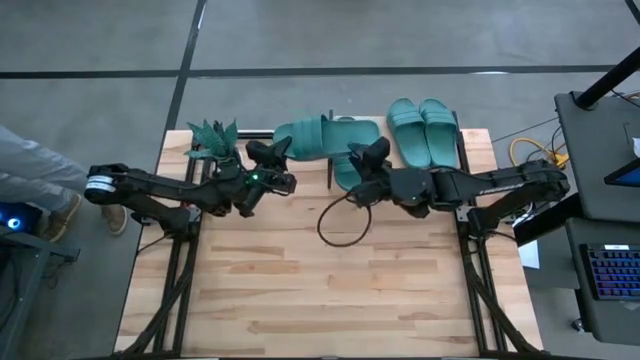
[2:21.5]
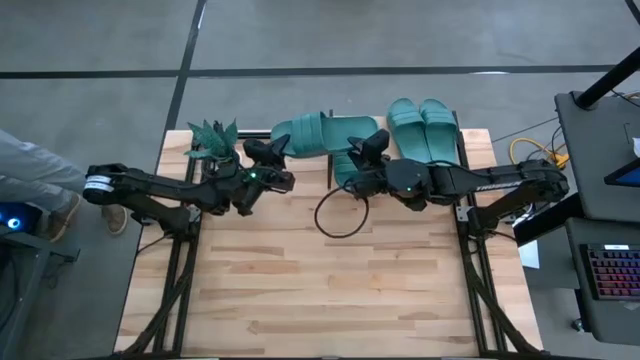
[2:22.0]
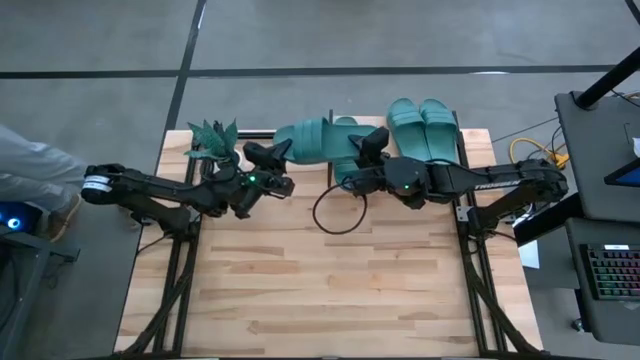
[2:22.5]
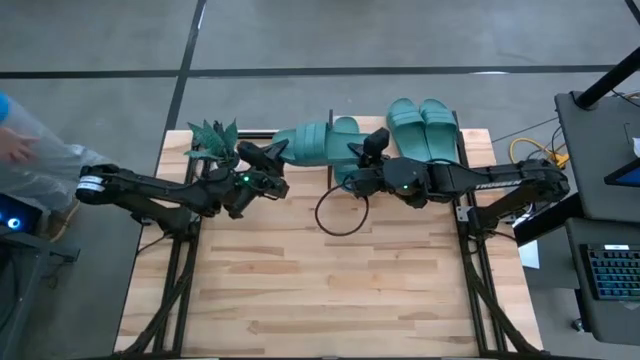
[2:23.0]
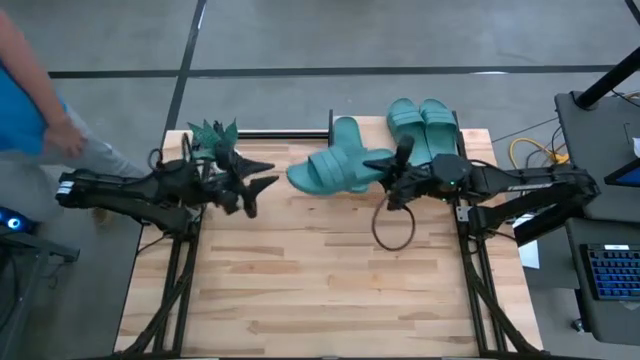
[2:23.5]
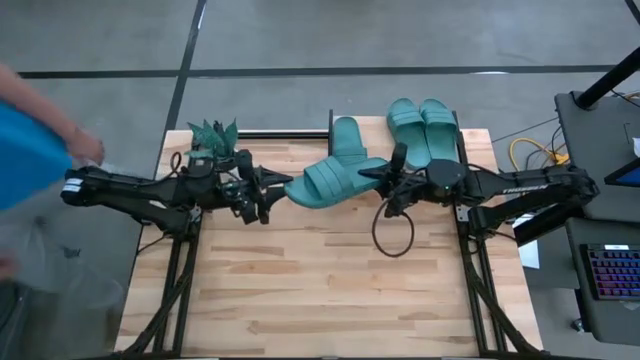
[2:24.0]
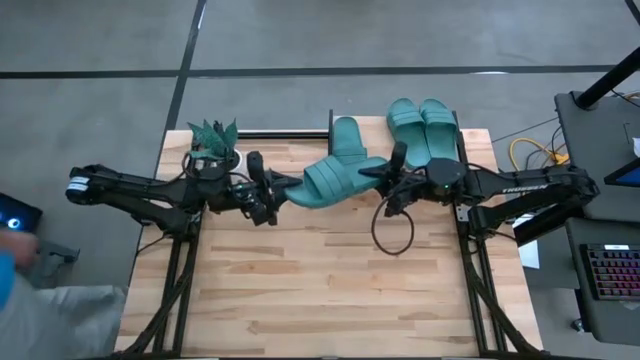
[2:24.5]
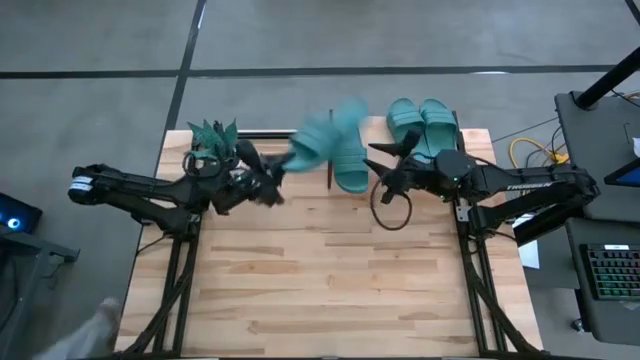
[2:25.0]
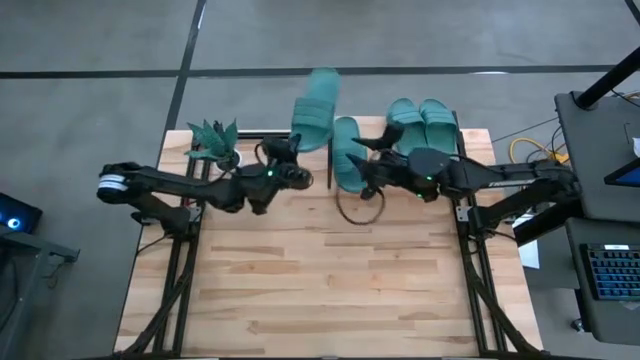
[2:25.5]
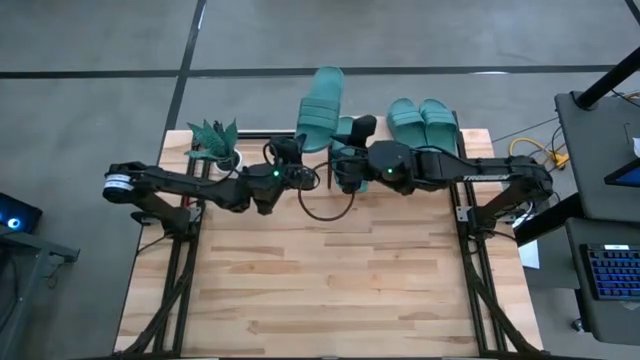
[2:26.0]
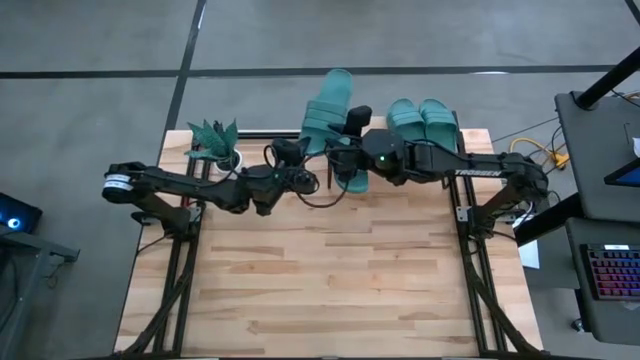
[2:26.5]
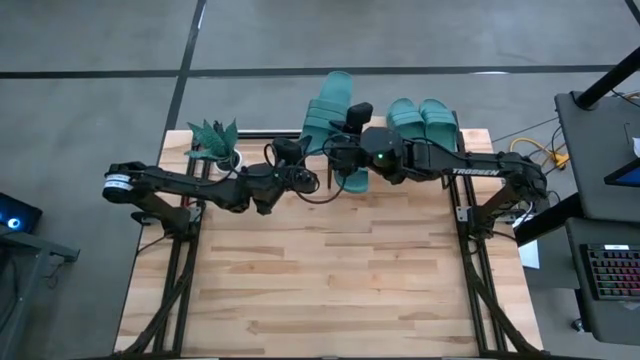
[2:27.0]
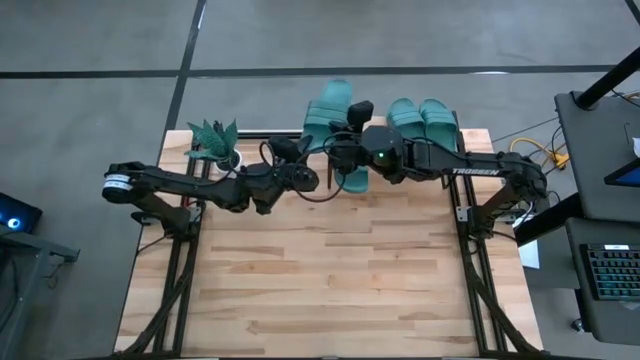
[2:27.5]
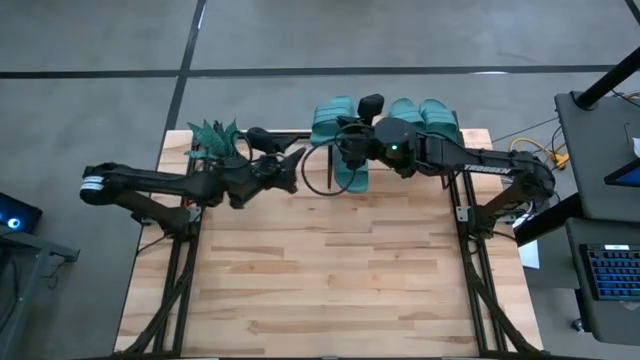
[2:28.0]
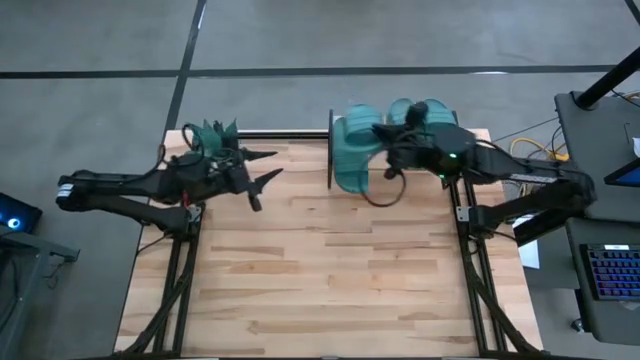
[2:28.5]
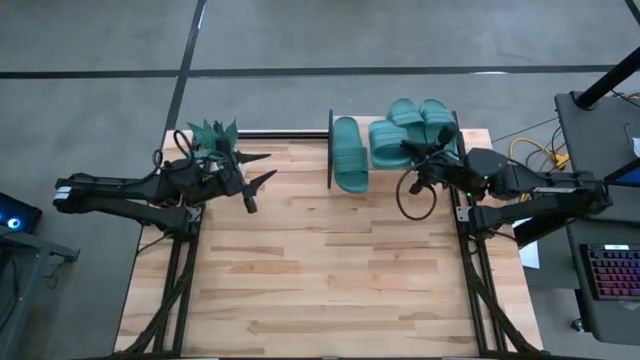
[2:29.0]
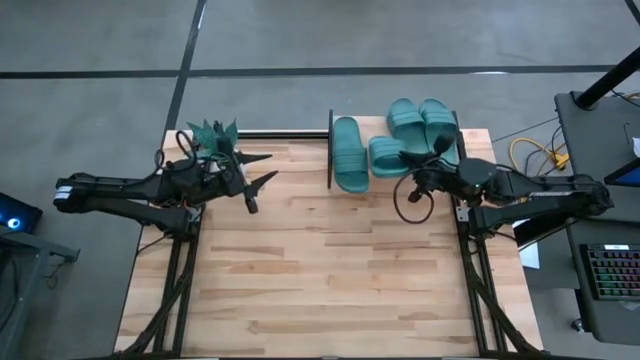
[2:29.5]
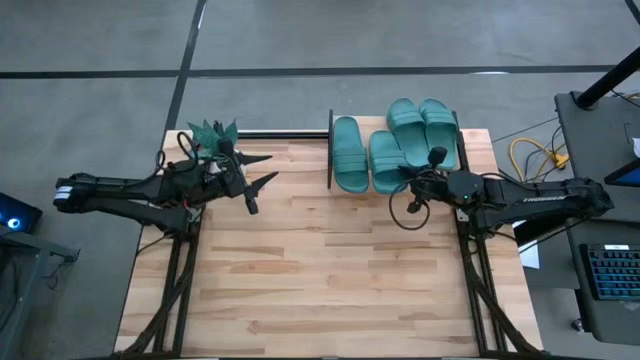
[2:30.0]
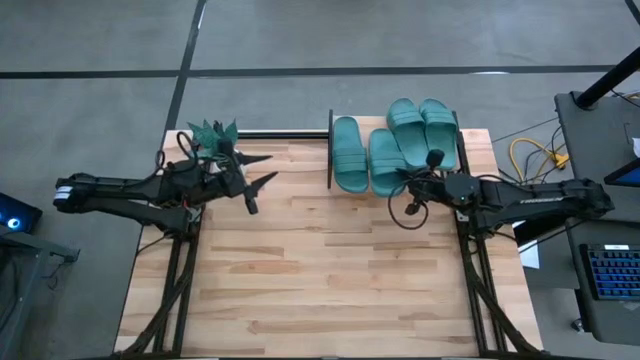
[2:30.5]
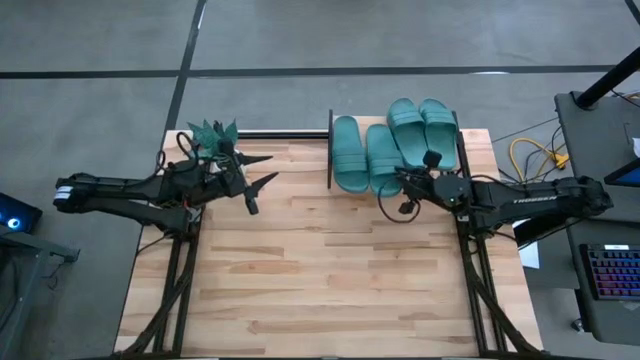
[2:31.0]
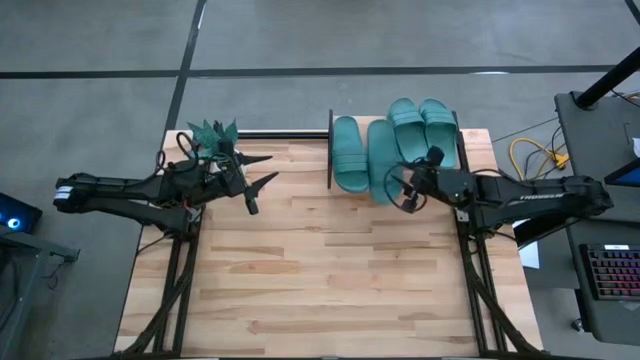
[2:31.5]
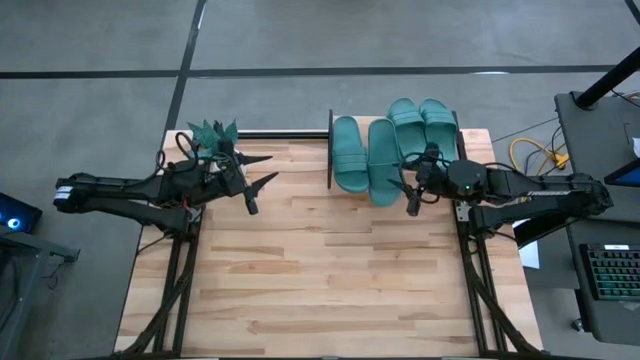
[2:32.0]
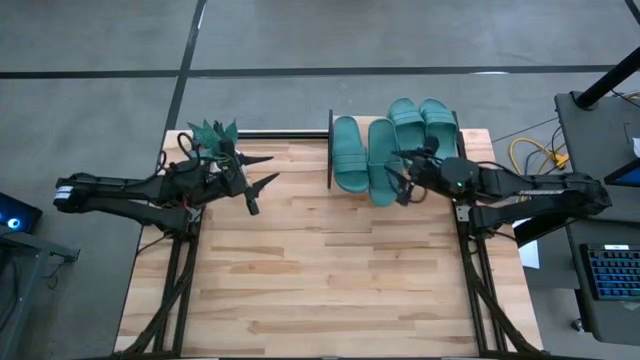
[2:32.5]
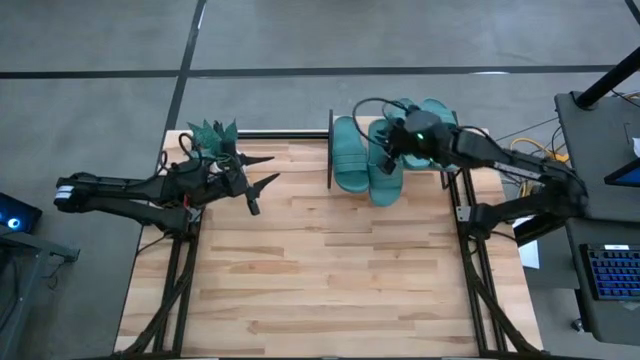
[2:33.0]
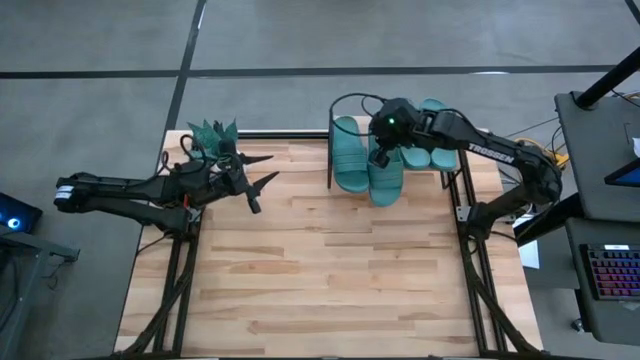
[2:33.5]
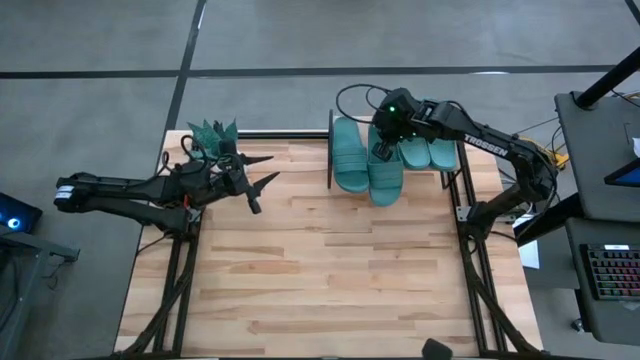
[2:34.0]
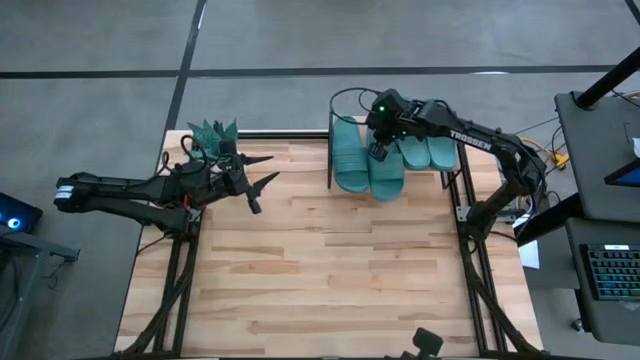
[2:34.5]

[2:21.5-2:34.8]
Task: Pick and place slides into the shelf
Put the green slipper on the shelf

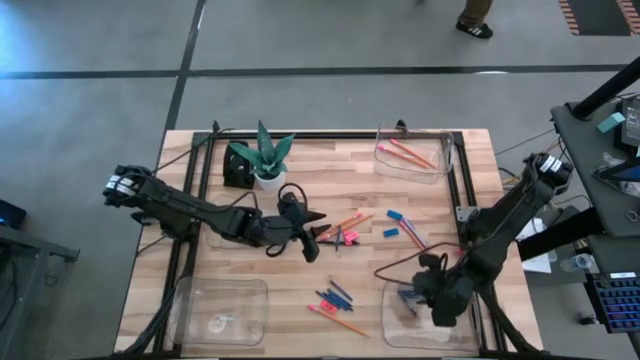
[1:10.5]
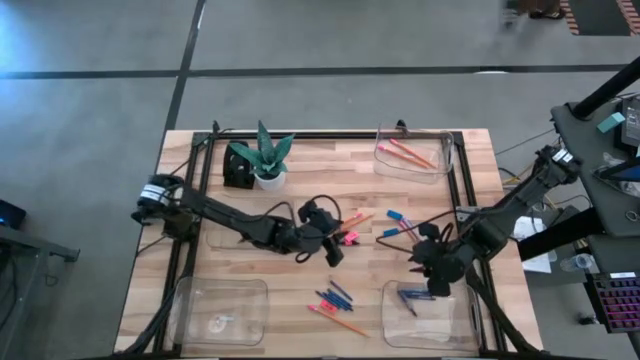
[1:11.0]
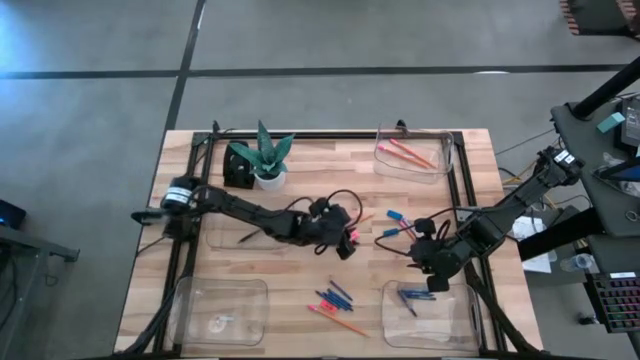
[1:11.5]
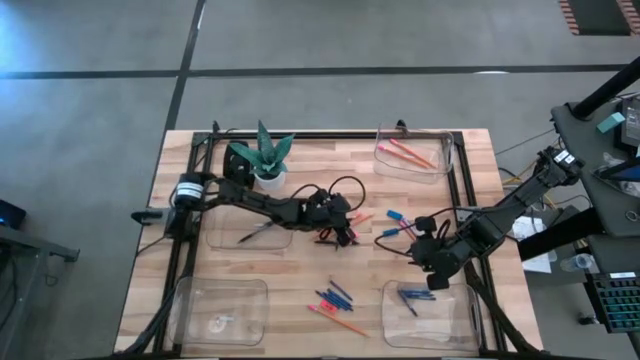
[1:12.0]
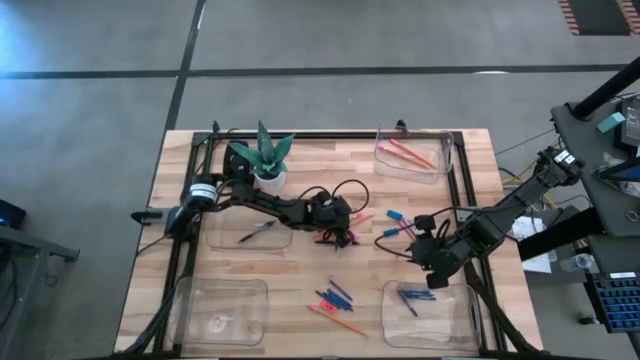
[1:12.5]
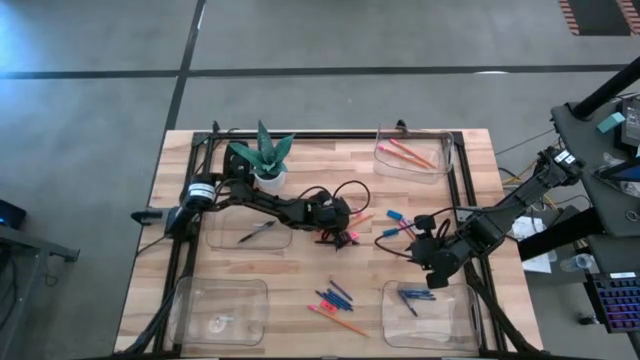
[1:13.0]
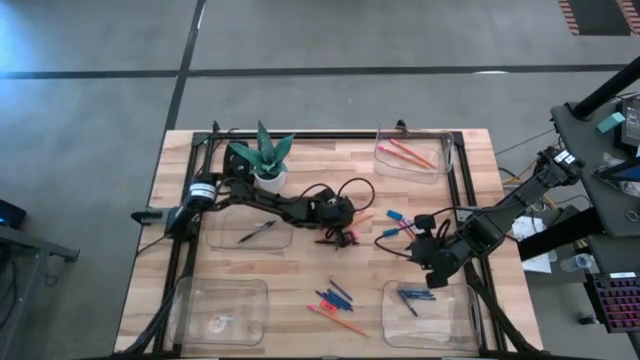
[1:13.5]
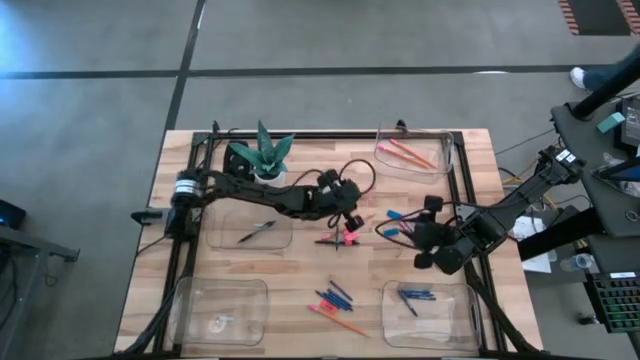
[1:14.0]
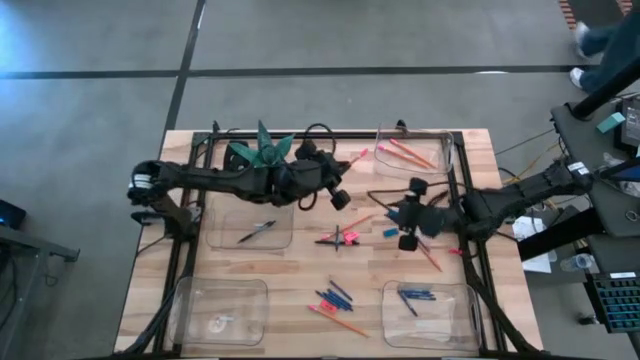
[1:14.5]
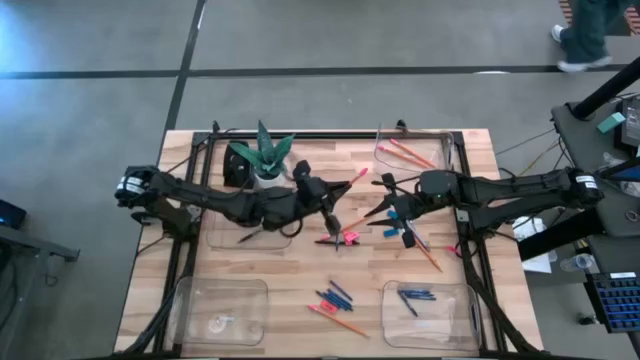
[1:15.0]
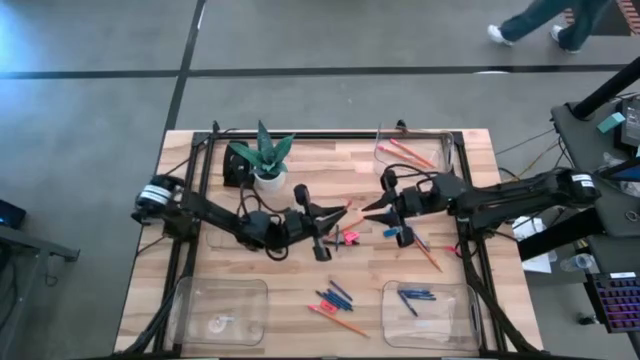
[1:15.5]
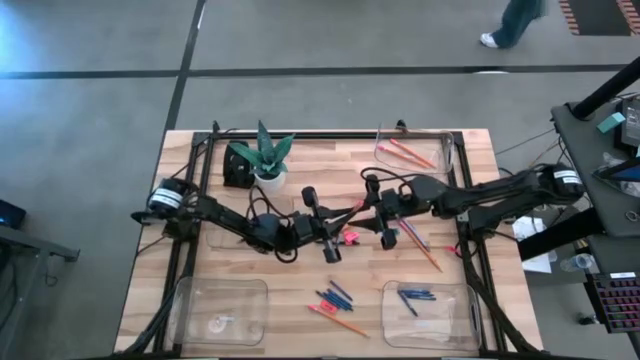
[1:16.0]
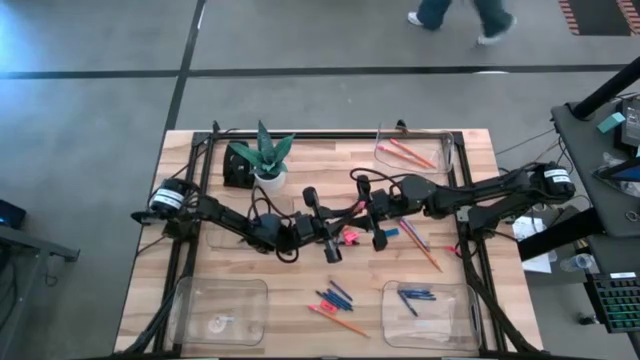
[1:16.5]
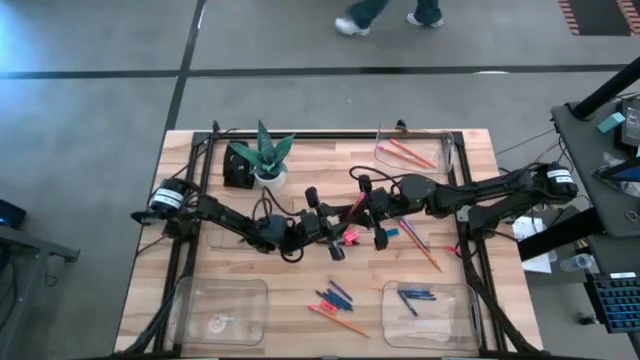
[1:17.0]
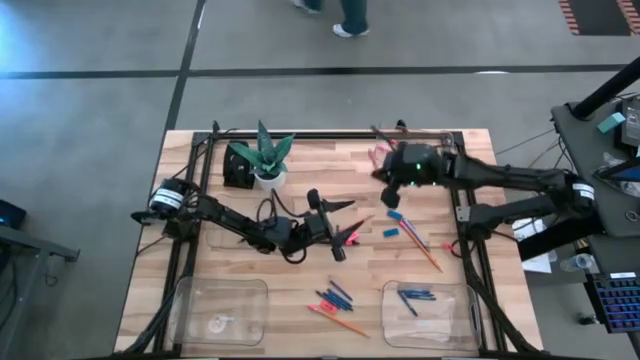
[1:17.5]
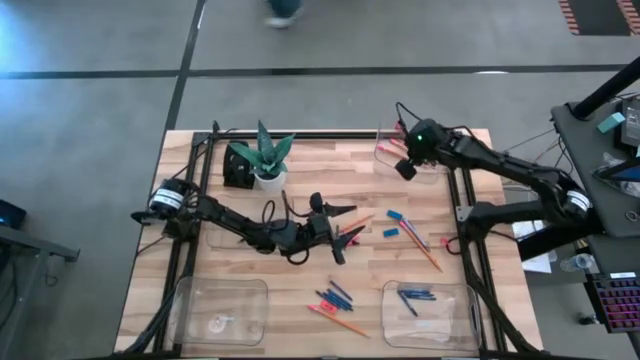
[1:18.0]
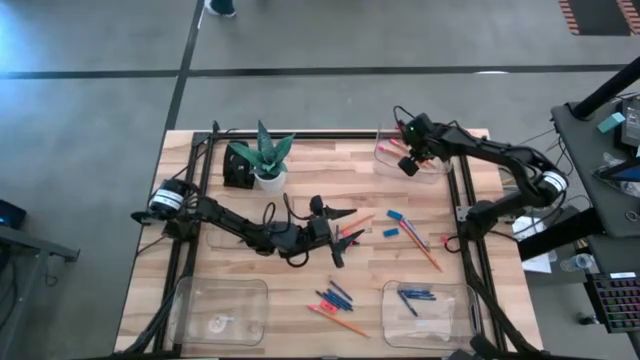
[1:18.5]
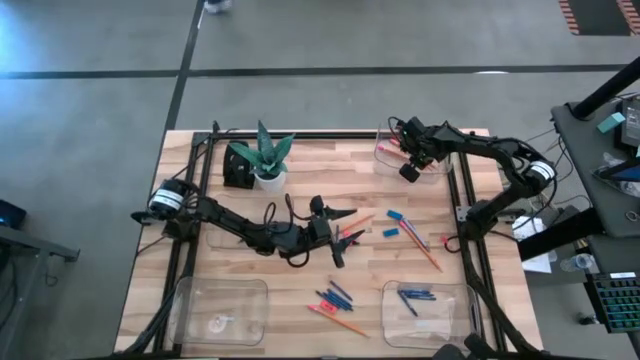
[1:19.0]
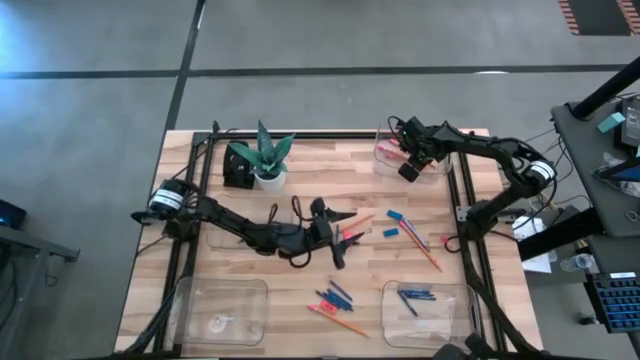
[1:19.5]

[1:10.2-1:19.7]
Task: Sort crayons/erasers/pens/pencils in bins
Put the orange pencil into the top right transparent bin
